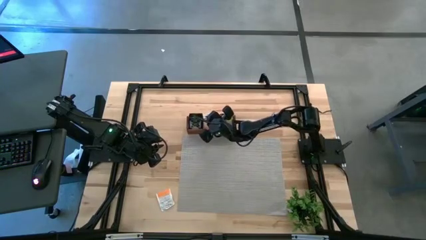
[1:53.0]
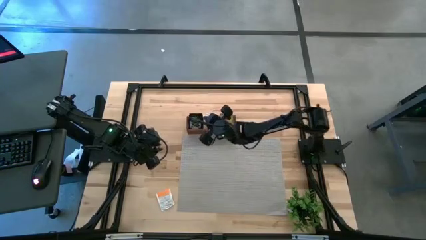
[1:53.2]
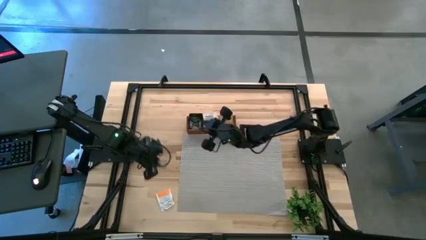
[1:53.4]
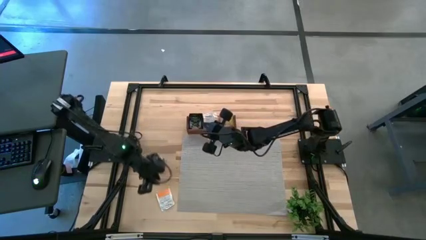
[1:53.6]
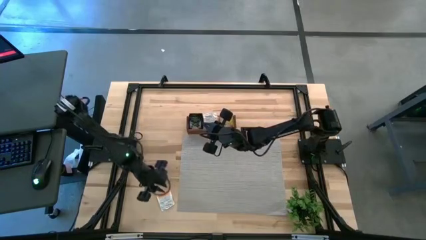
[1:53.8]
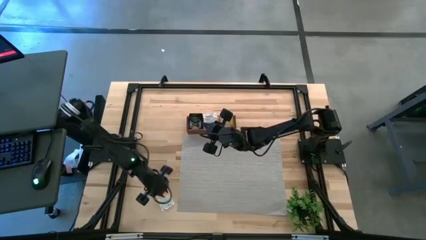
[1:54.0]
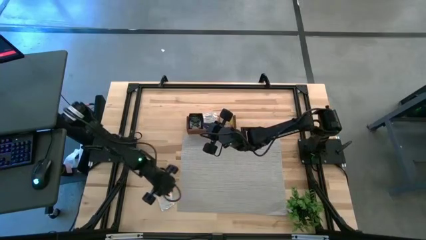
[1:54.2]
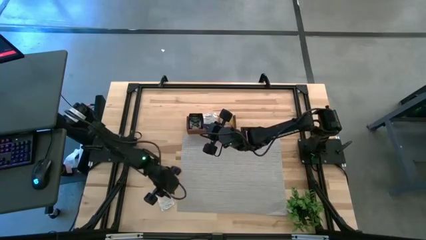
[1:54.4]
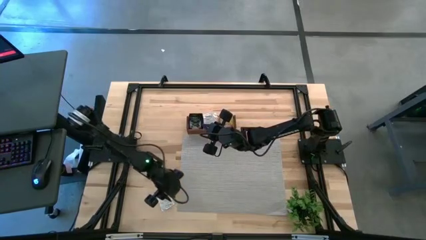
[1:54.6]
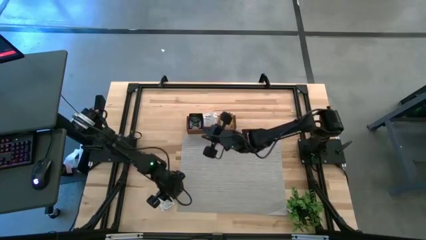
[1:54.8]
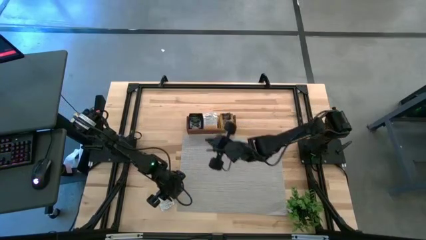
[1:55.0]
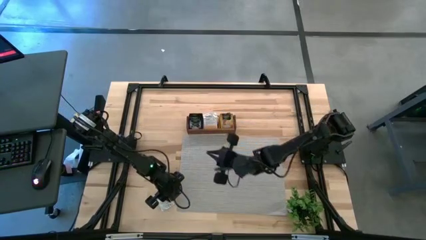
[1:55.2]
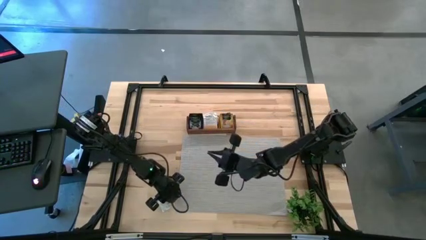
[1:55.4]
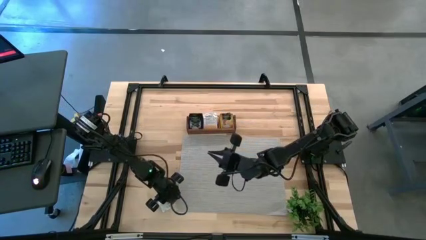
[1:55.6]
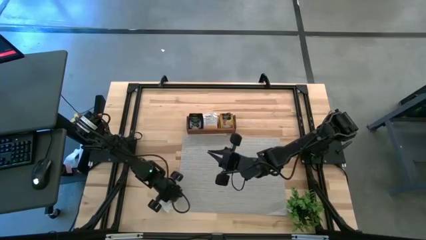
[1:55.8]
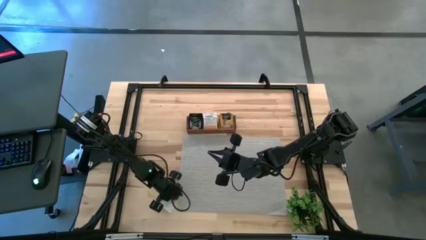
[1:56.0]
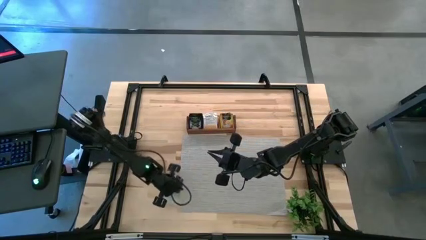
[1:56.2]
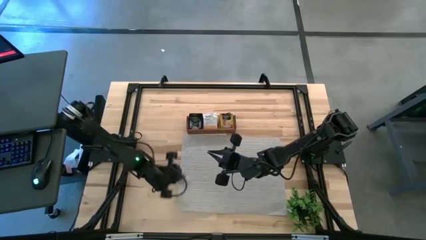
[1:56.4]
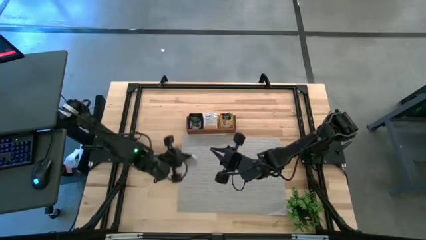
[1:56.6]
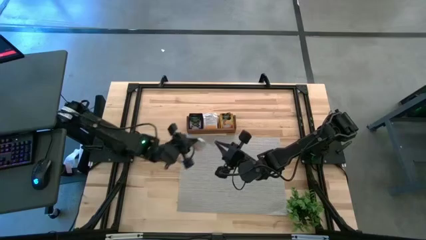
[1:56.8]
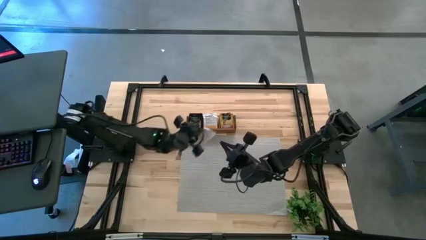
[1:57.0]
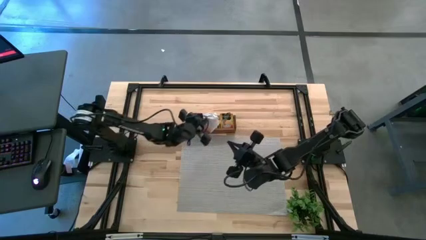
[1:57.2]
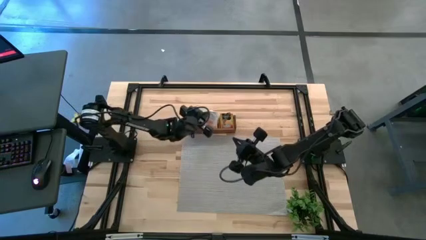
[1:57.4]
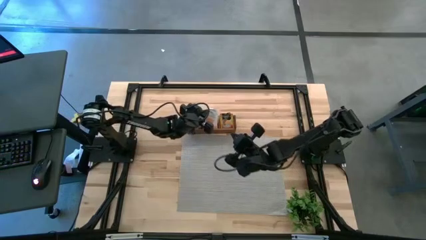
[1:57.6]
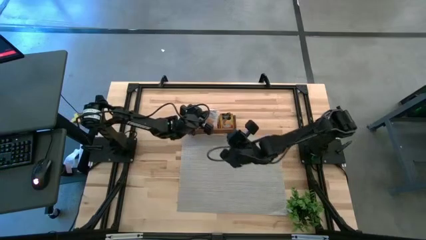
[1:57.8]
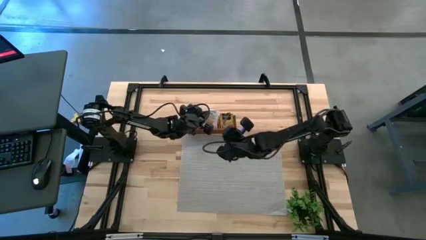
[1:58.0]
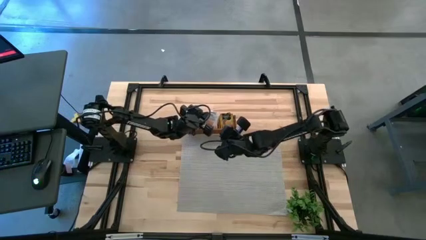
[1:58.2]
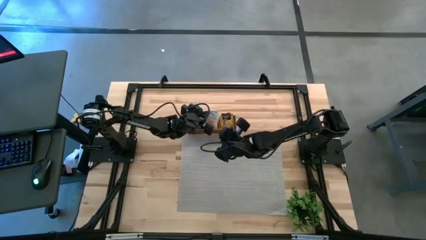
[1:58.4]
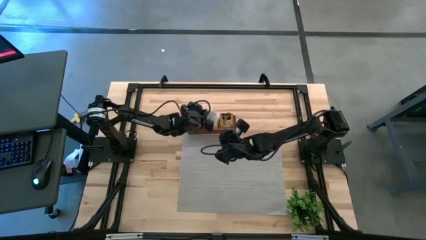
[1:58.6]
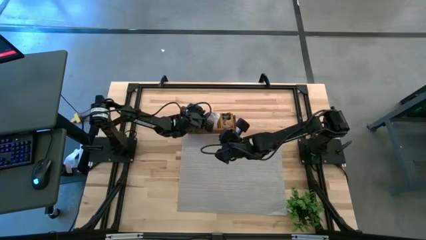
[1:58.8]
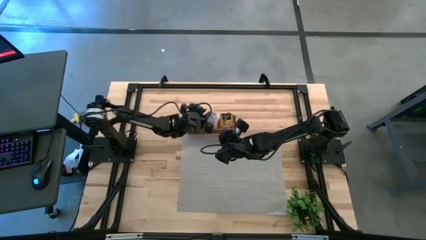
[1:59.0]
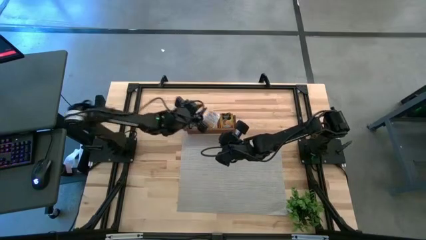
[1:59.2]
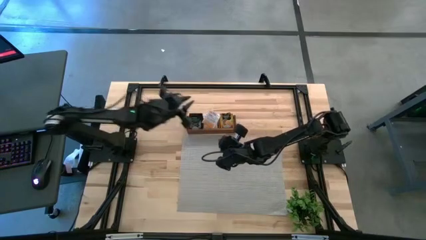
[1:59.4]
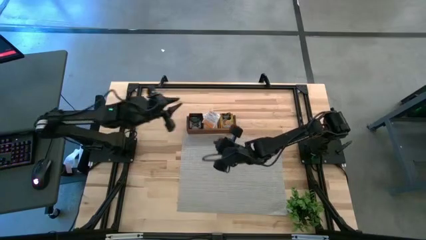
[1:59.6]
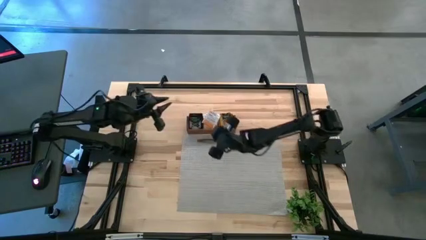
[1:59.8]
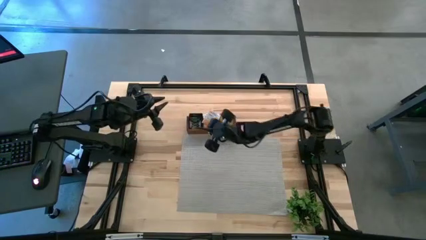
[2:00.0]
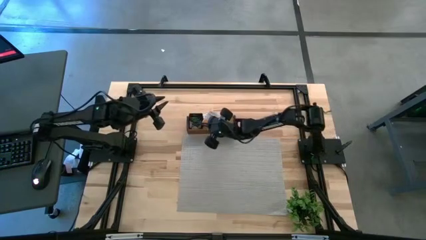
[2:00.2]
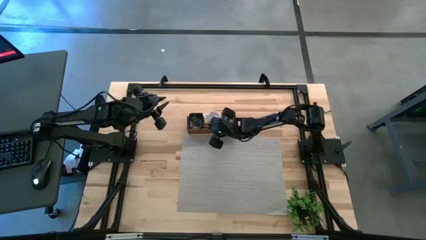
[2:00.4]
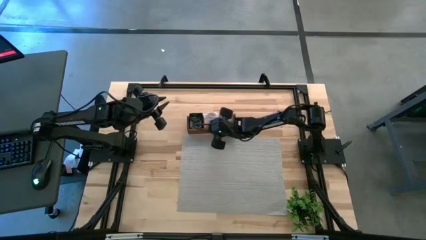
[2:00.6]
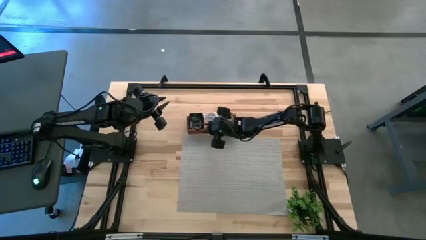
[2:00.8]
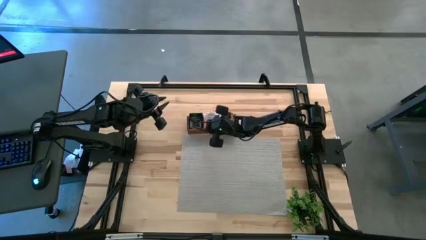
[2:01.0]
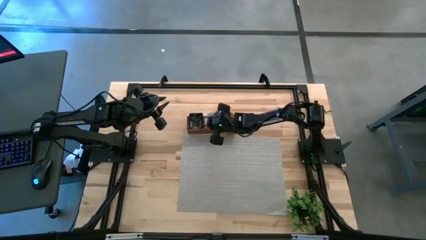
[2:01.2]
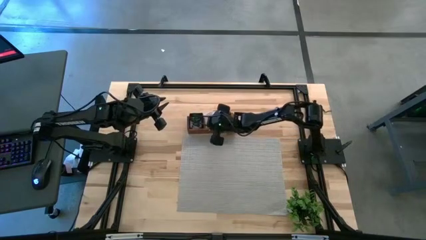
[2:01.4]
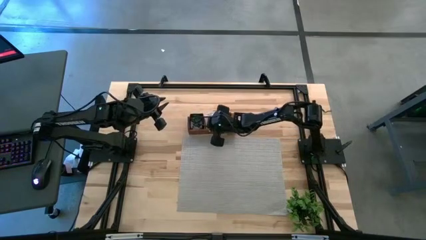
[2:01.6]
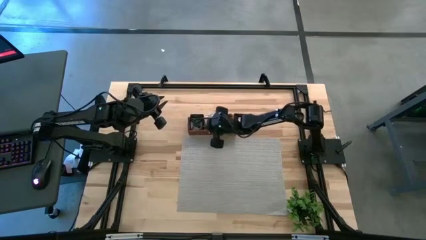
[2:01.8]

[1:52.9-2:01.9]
Task: Pick & Place Tea
Put the white tea bag into the middle section of the wooden organizer

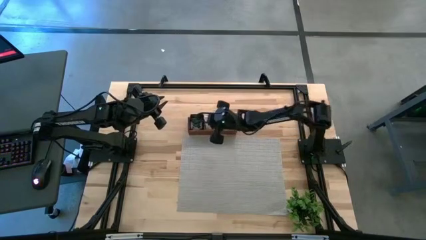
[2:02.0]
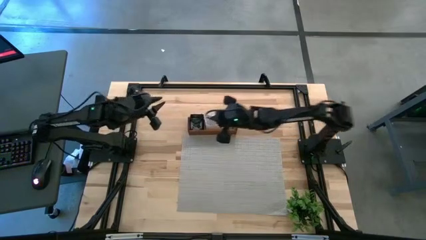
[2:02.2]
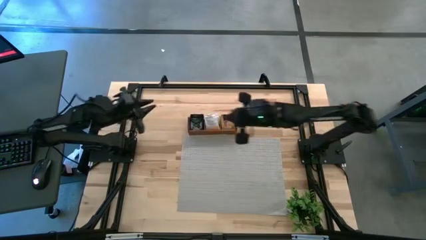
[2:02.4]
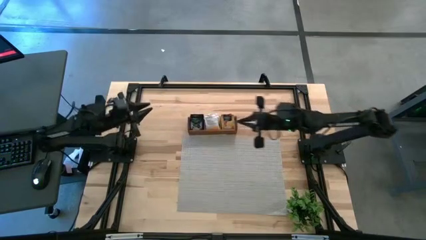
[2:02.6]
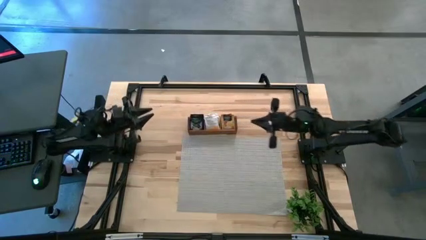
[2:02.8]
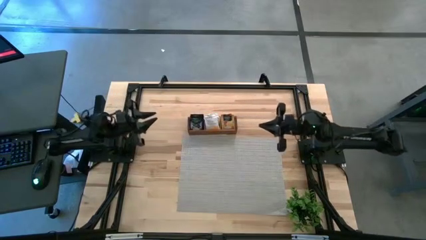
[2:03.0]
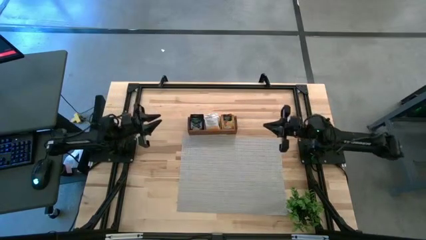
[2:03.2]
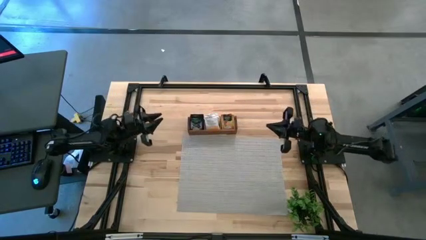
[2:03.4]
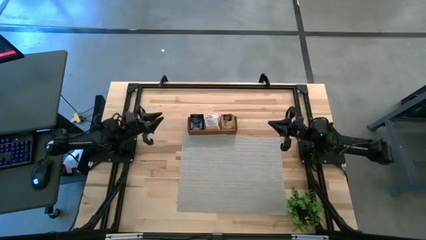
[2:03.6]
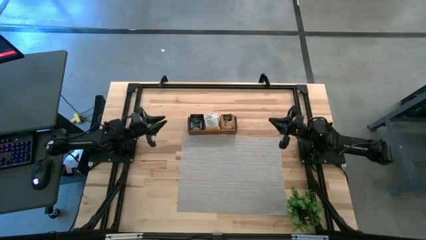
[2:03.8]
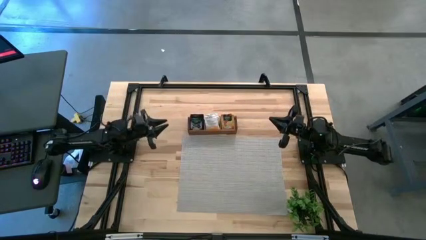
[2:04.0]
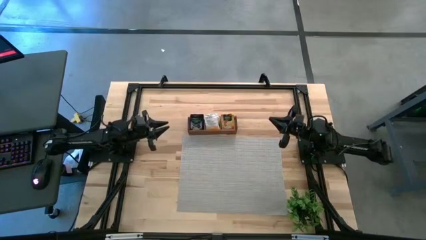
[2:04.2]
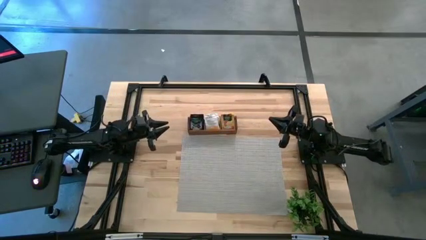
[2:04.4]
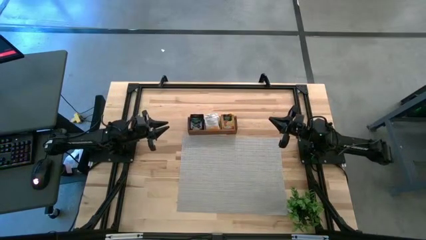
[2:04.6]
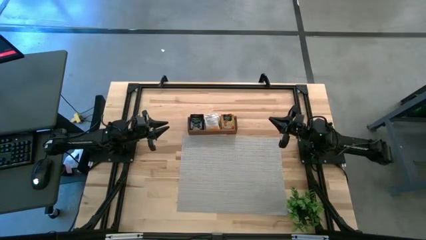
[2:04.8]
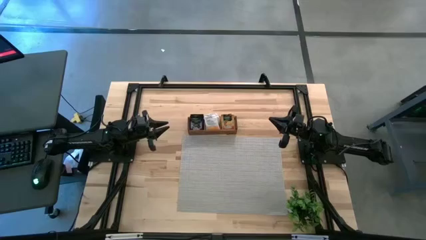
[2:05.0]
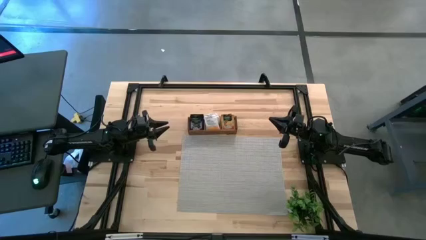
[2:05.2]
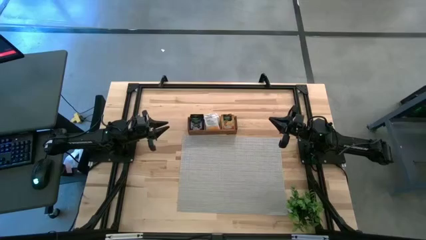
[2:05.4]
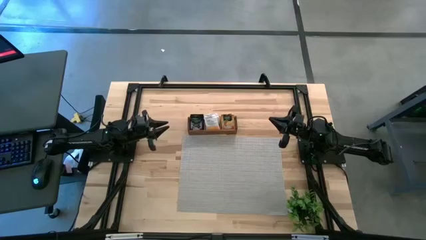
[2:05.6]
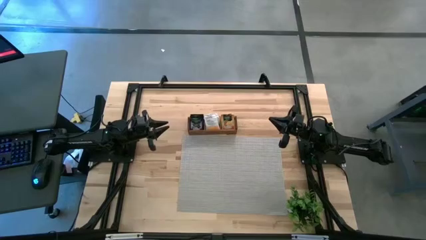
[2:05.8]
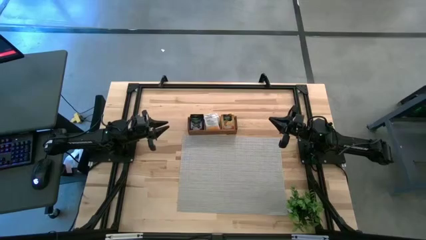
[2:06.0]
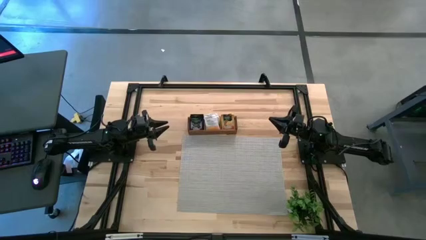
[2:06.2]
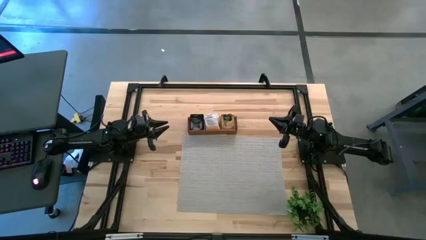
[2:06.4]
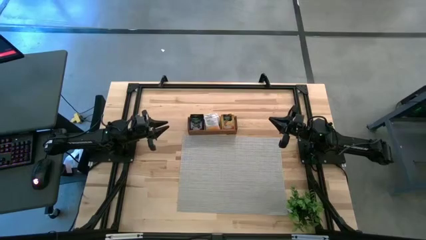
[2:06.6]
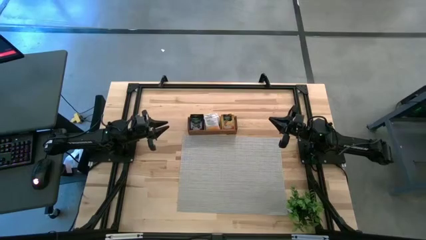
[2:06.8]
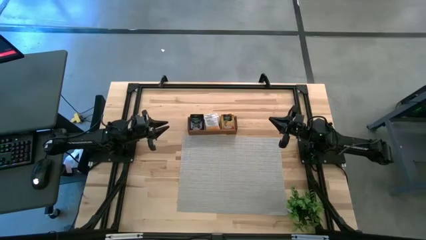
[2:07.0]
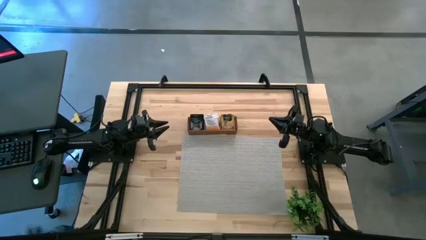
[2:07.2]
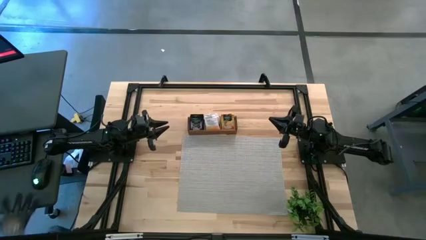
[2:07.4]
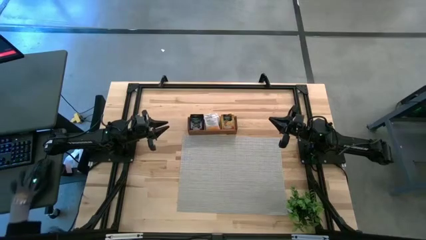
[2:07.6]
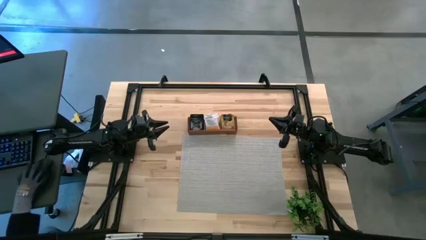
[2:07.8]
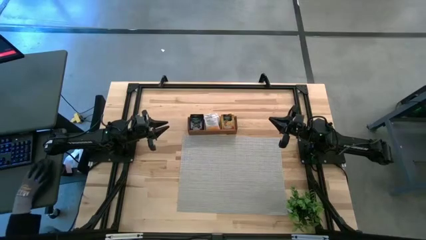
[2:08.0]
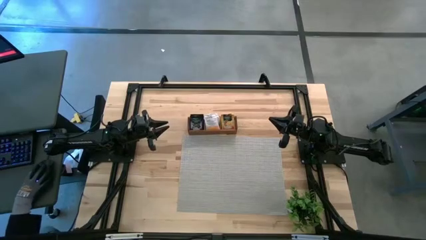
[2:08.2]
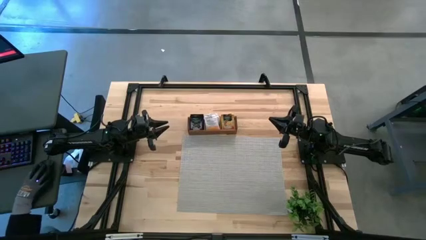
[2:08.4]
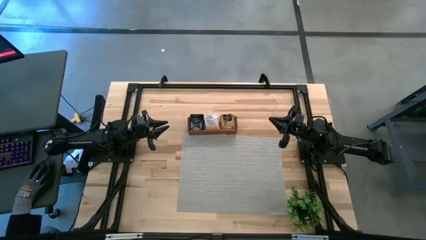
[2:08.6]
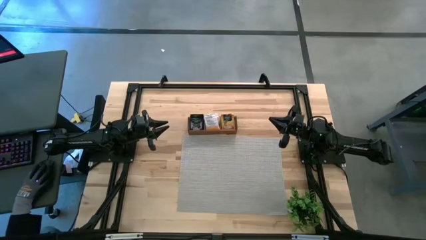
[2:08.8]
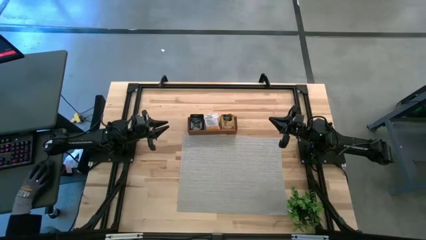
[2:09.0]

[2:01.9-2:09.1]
Return to Home Position
